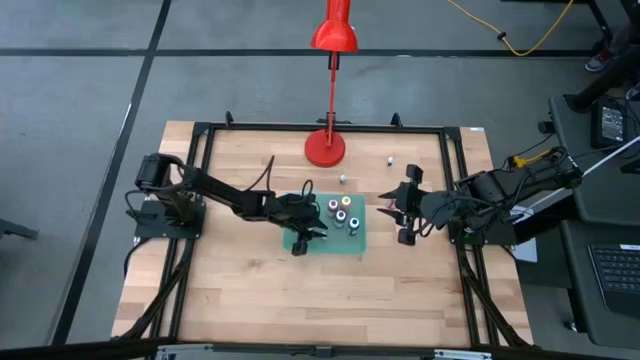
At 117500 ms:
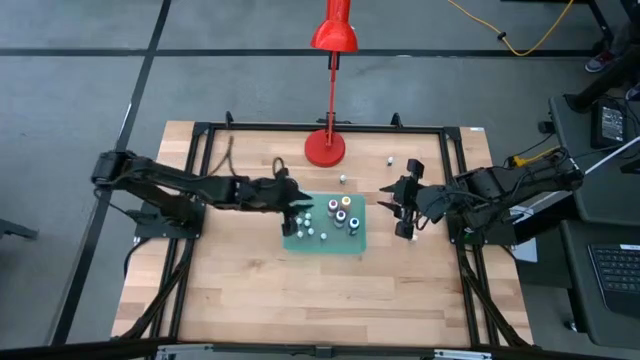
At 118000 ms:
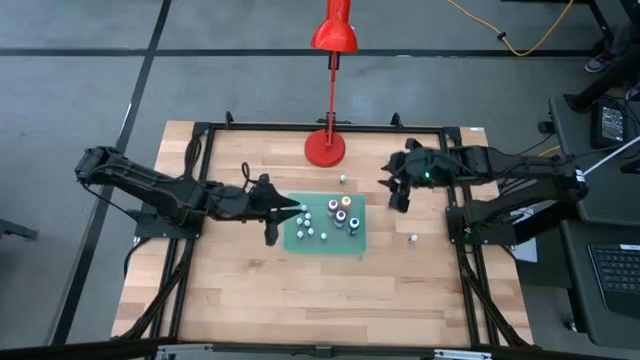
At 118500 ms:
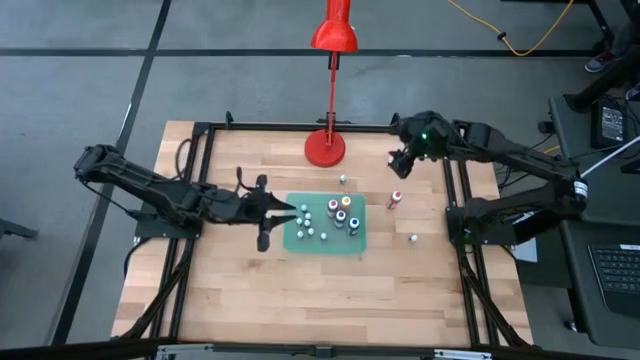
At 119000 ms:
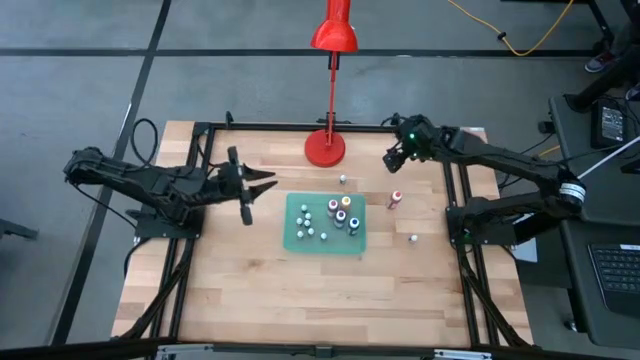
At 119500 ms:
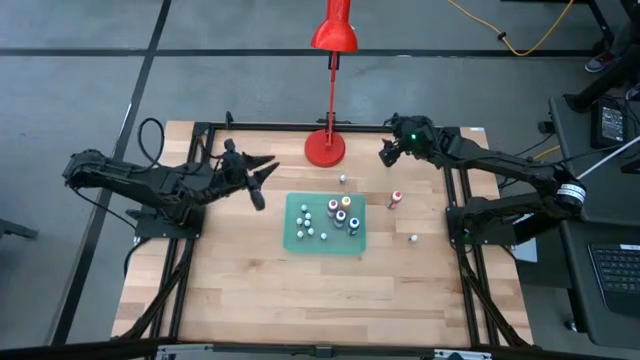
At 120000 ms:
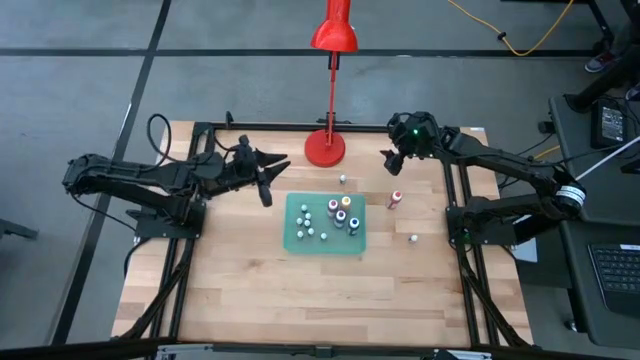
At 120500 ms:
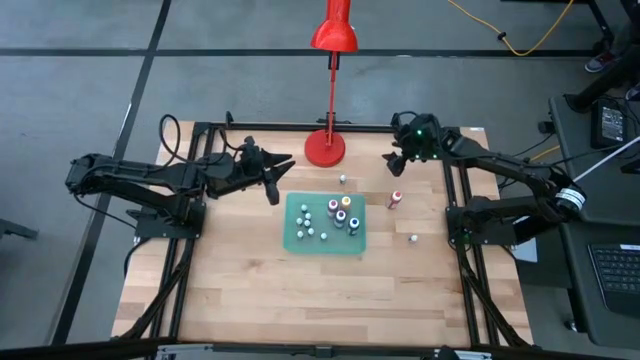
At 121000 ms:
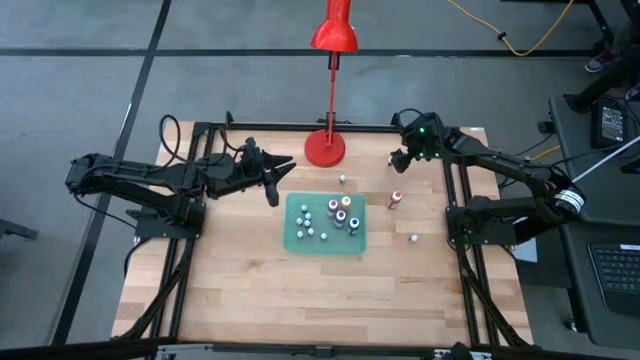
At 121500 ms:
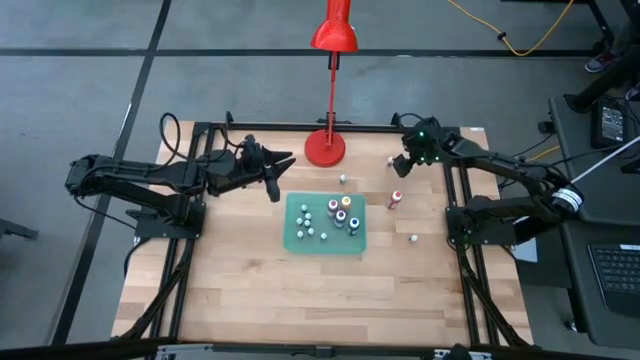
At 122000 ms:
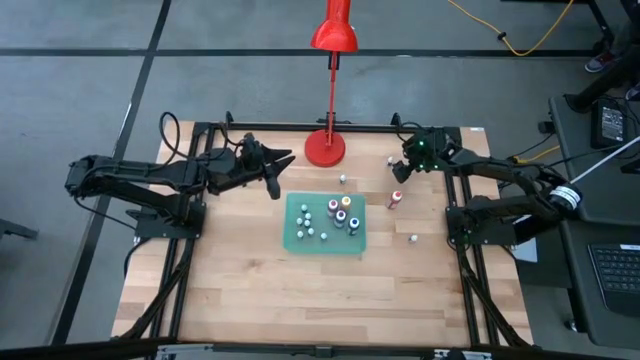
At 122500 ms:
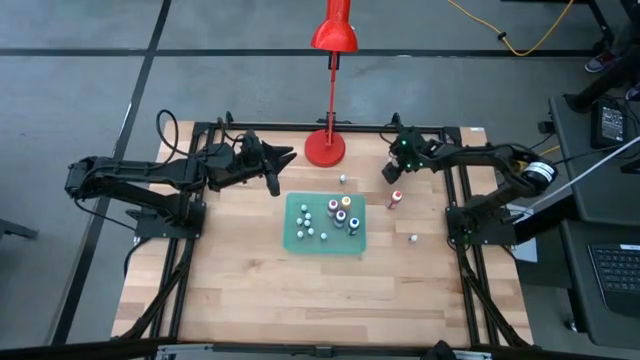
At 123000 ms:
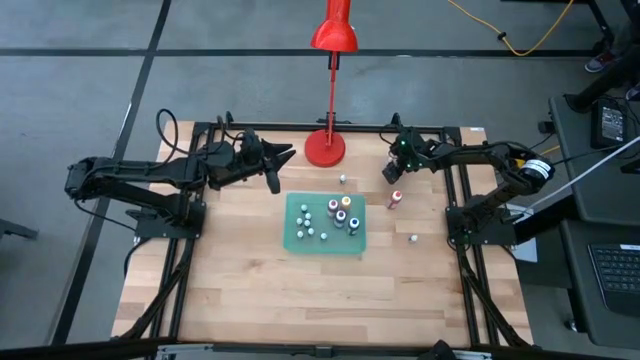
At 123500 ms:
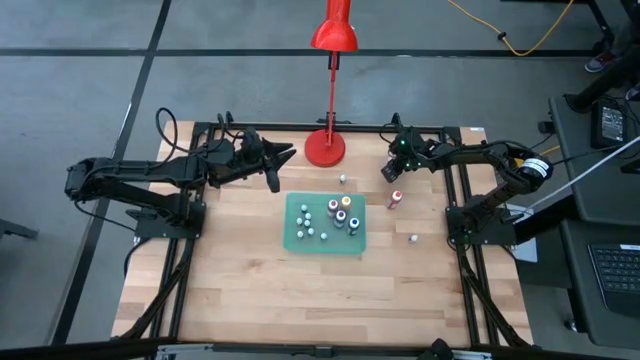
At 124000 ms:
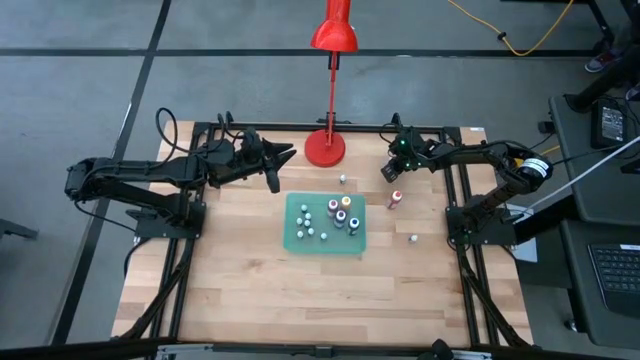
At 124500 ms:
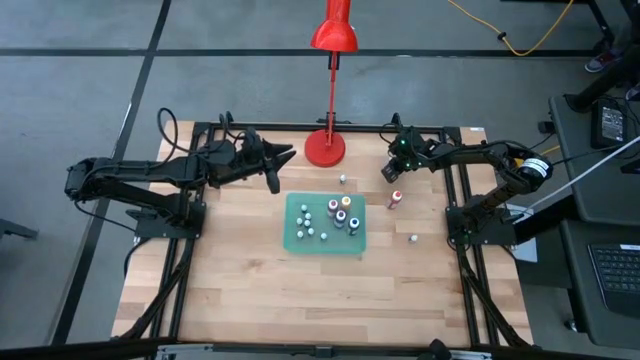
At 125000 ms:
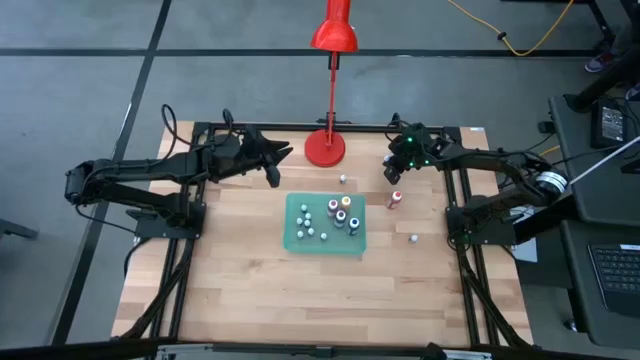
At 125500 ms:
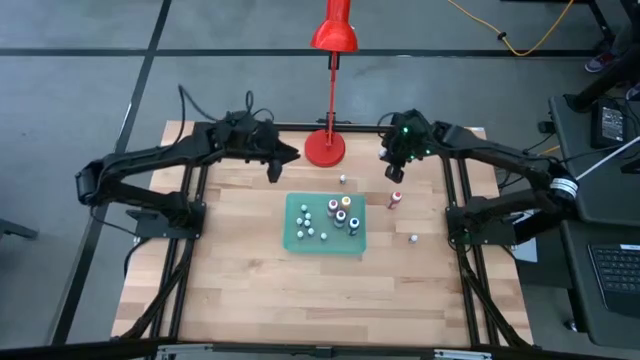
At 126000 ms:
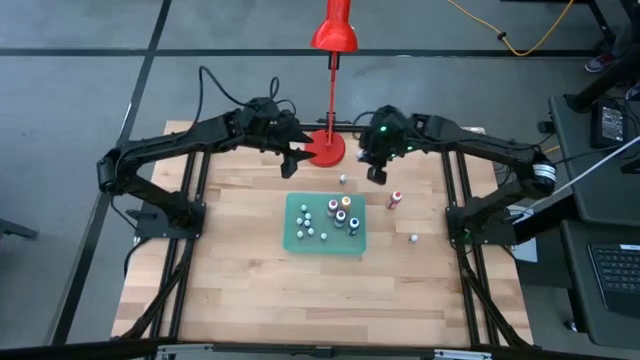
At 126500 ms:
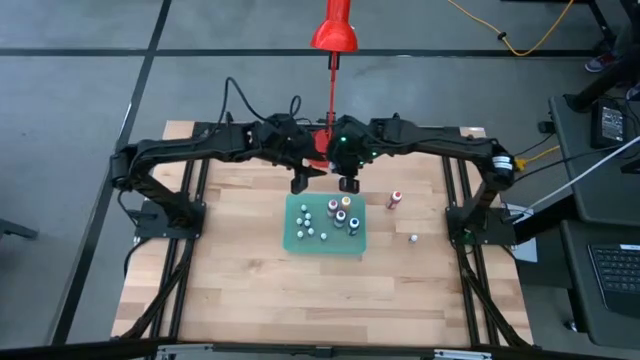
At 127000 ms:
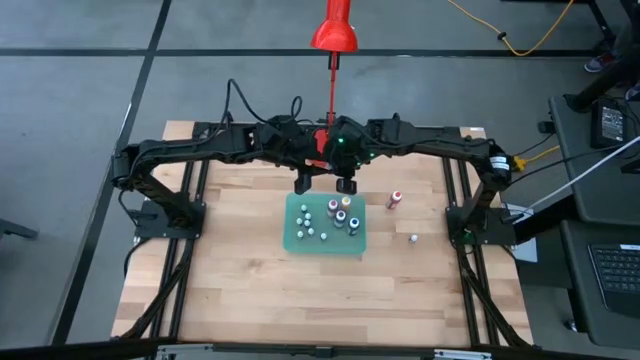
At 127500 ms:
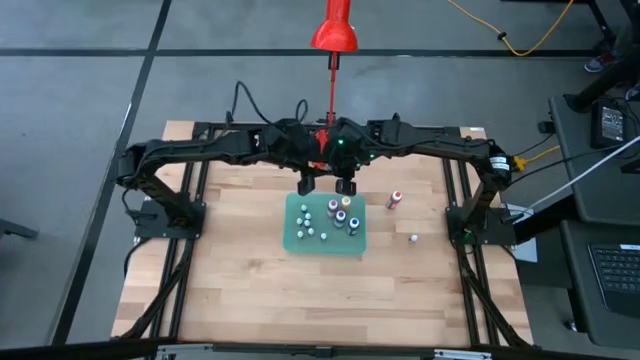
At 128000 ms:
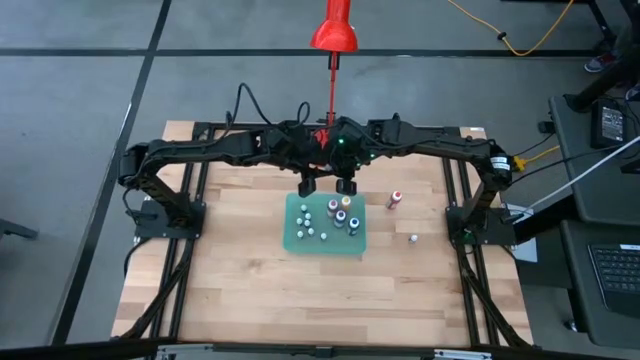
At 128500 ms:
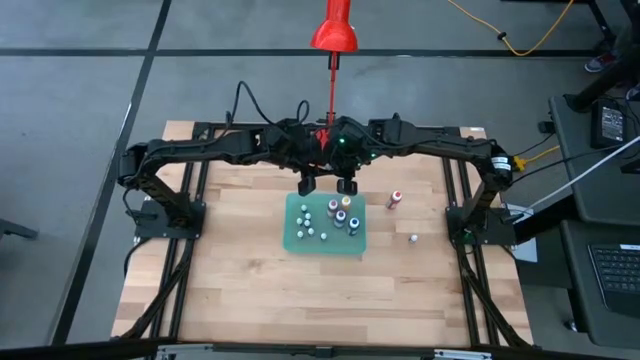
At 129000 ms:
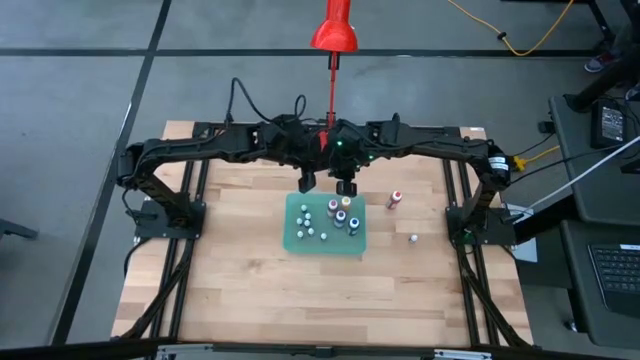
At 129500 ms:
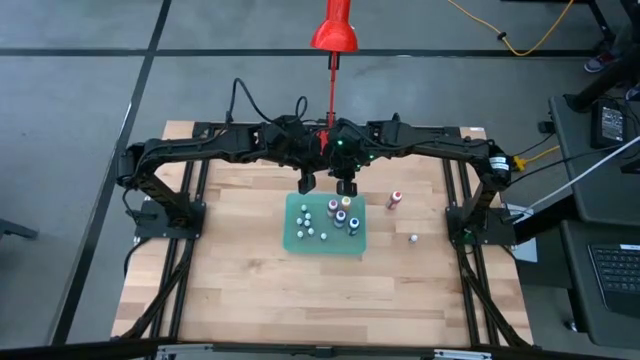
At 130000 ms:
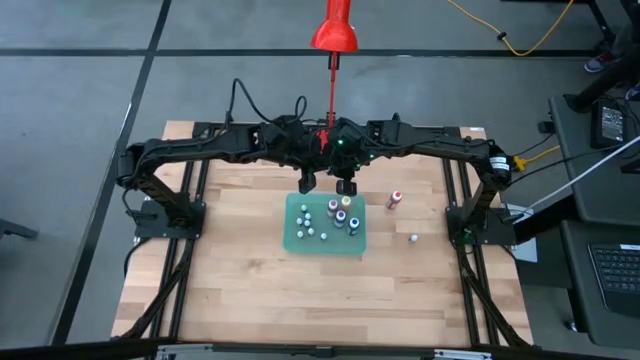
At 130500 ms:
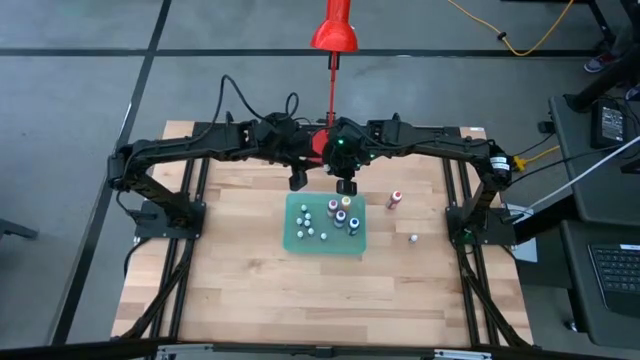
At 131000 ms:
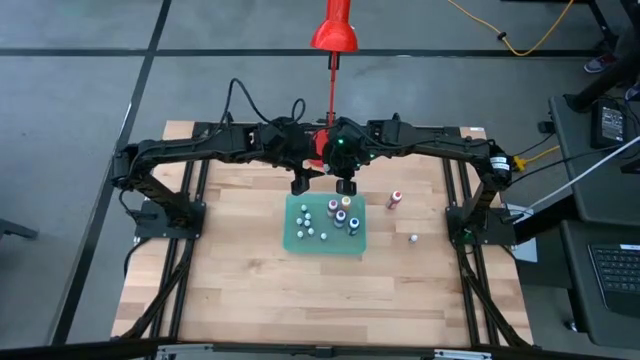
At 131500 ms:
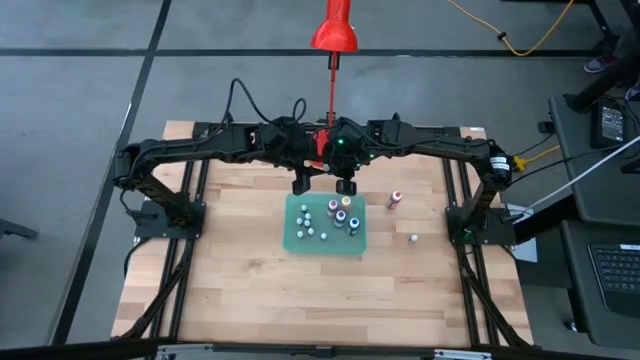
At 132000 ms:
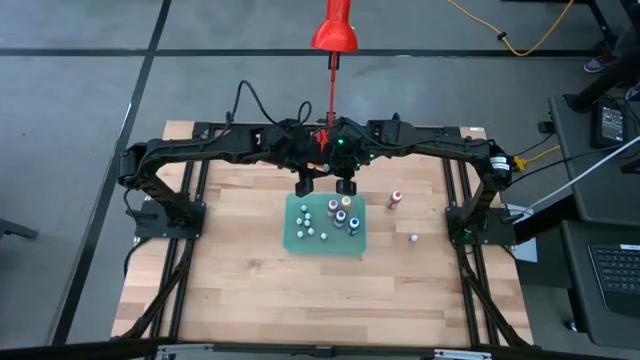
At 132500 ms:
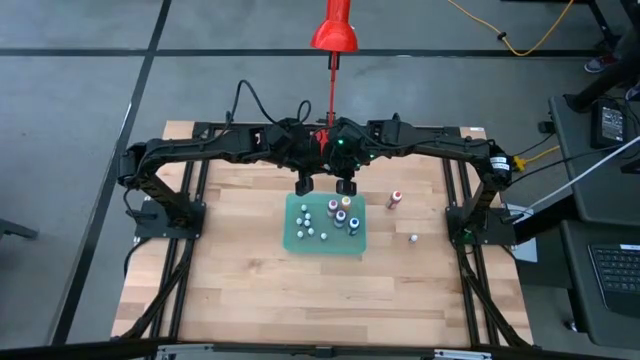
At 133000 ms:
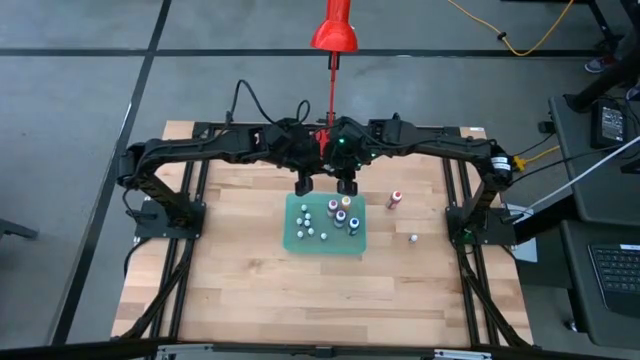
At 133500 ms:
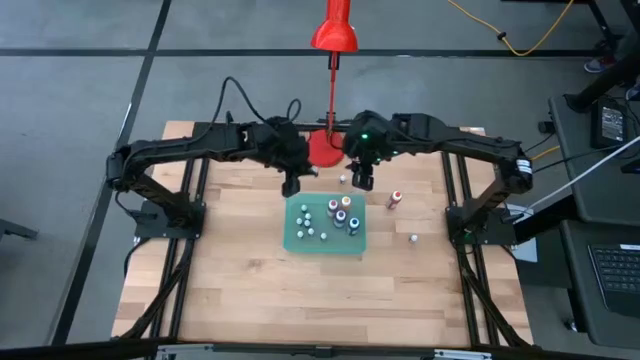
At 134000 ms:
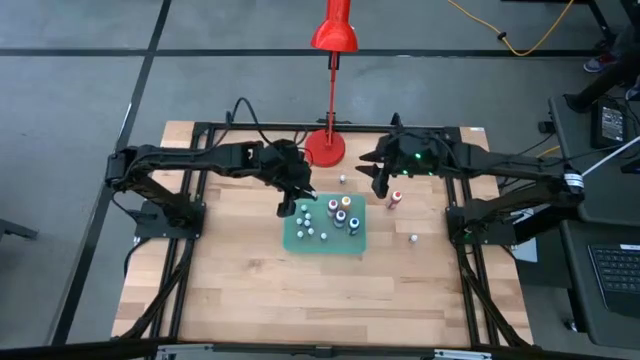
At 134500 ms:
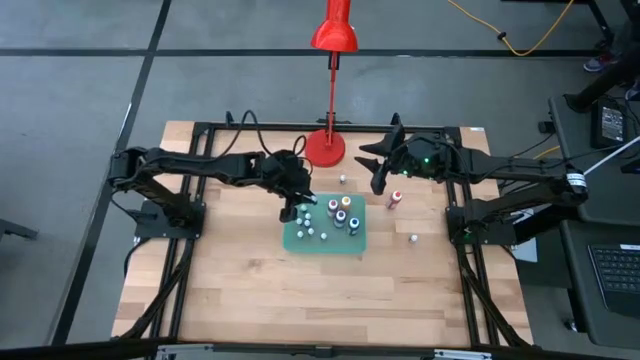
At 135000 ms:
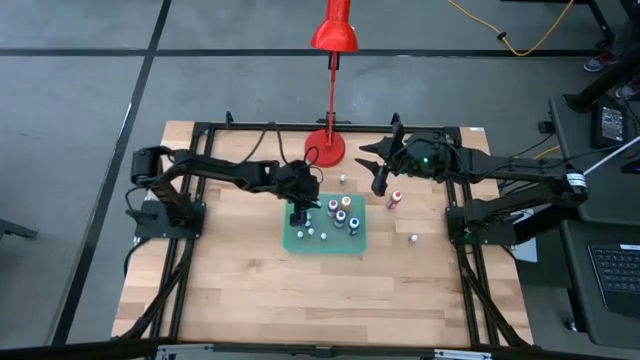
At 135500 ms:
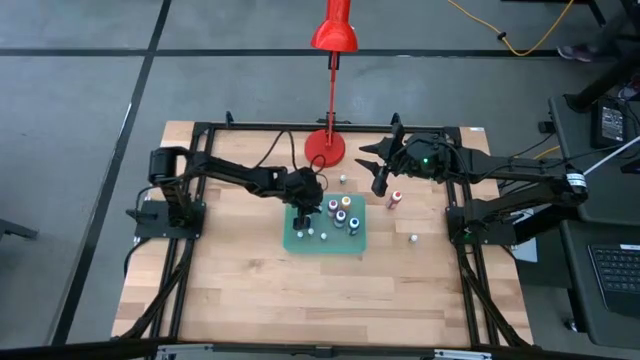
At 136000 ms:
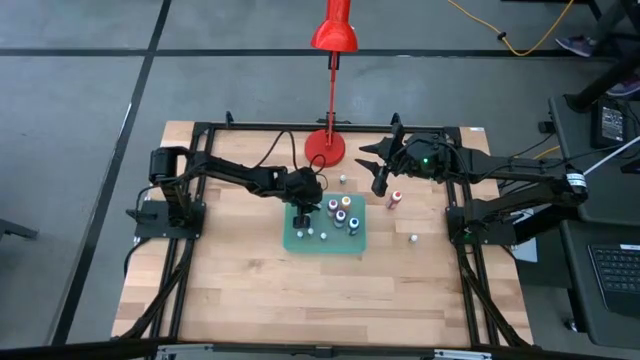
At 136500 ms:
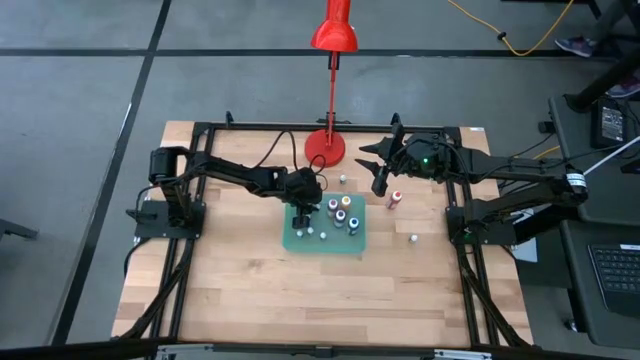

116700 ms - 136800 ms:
Task: Pick & Place food coloring
Put the small pink food coloring bottle into the green bin

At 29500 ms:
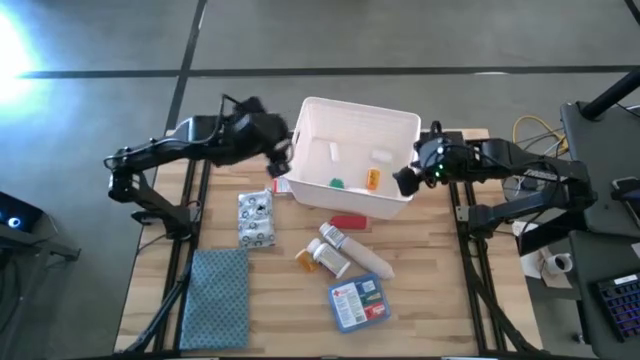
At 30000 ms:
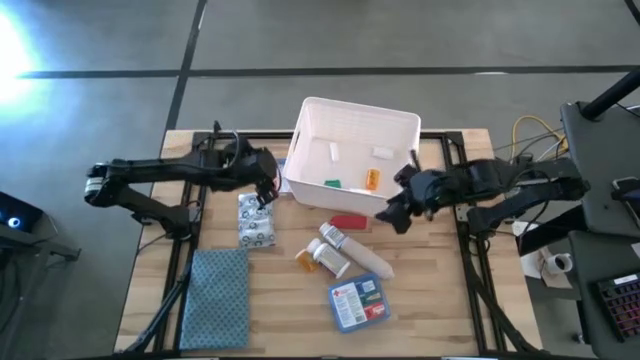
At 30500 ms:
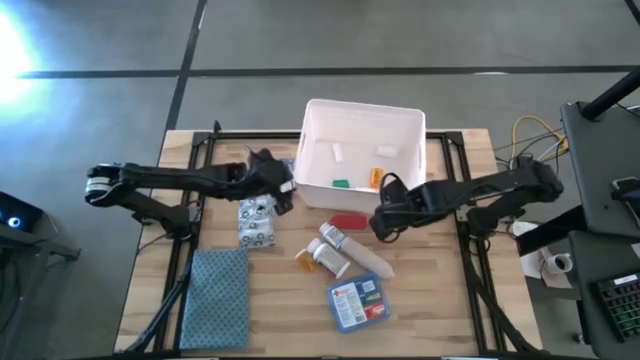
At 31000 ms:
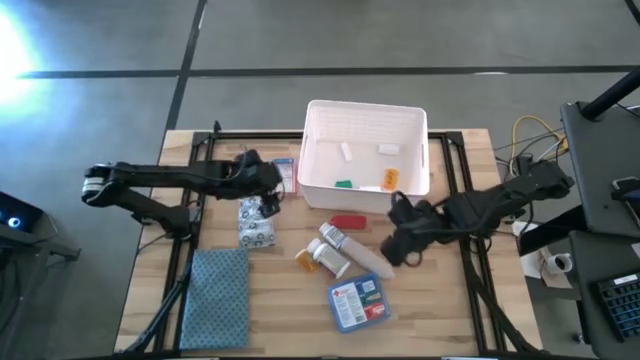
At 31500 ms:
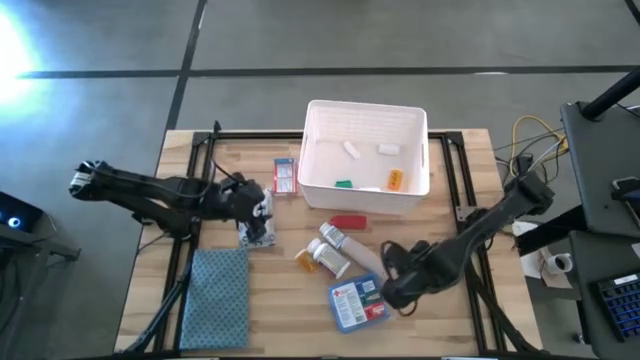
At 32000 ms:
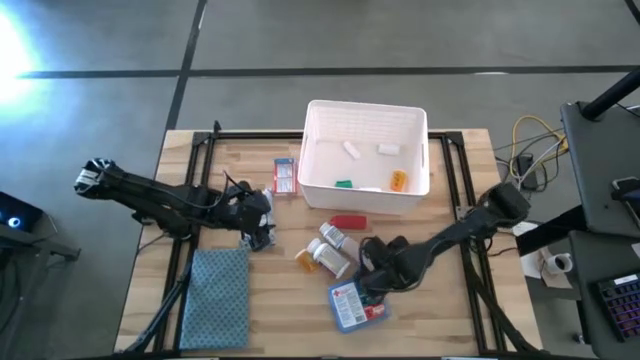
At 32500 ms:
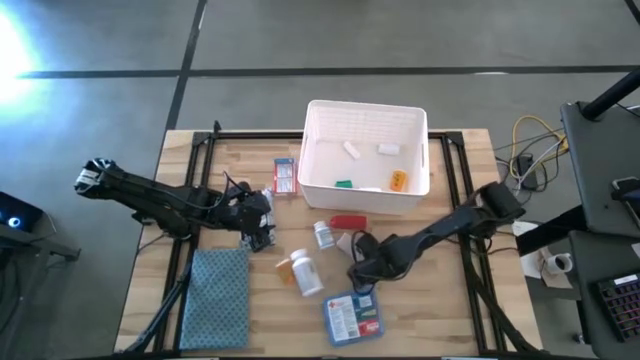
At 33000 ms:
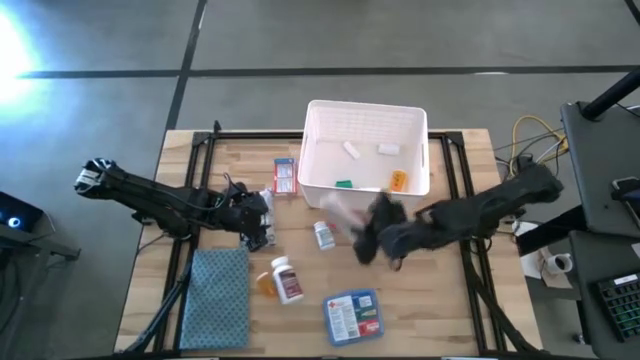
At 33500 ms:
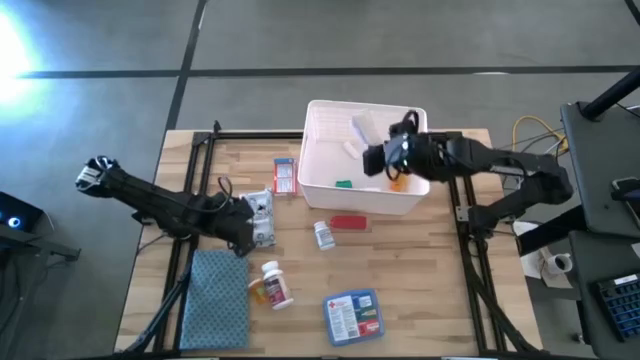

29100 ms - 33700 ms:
Task: Pick & place medical supplies in basket/bin
Put the white bandage into the bin
